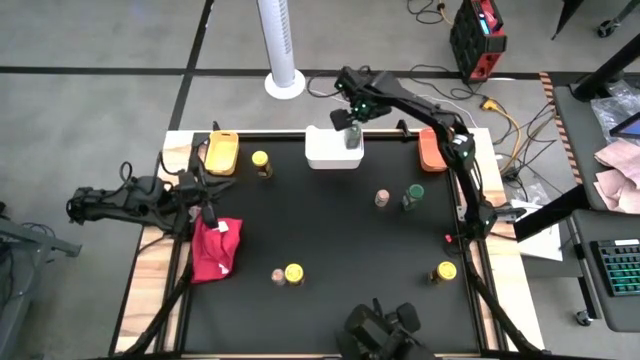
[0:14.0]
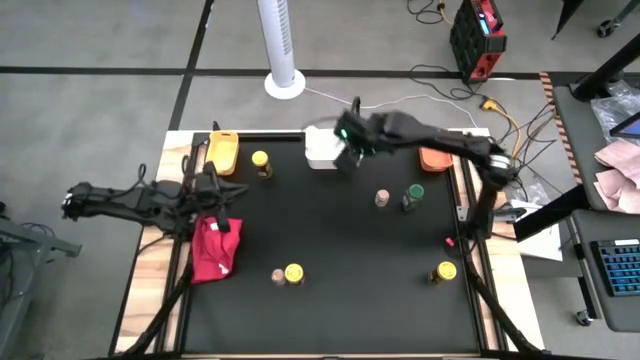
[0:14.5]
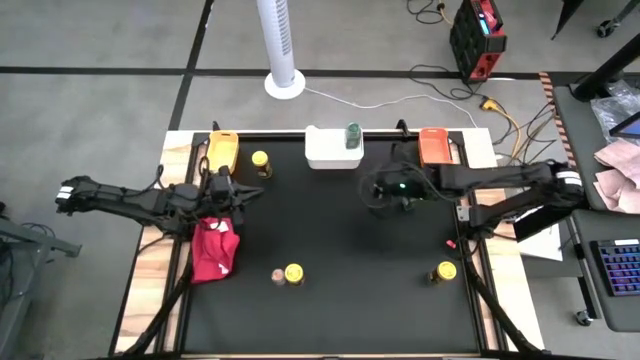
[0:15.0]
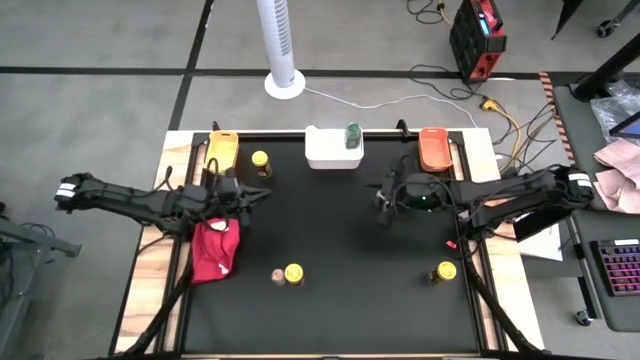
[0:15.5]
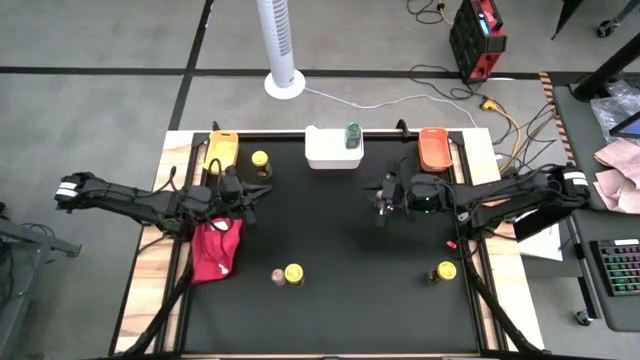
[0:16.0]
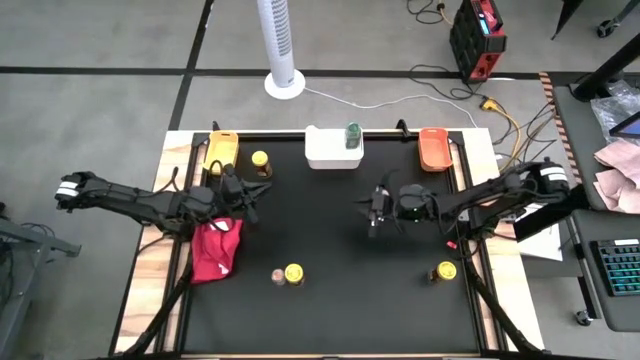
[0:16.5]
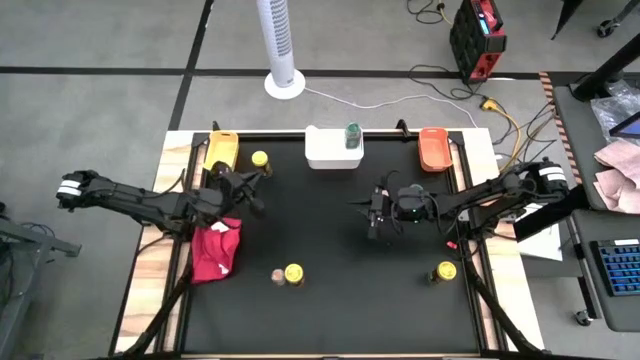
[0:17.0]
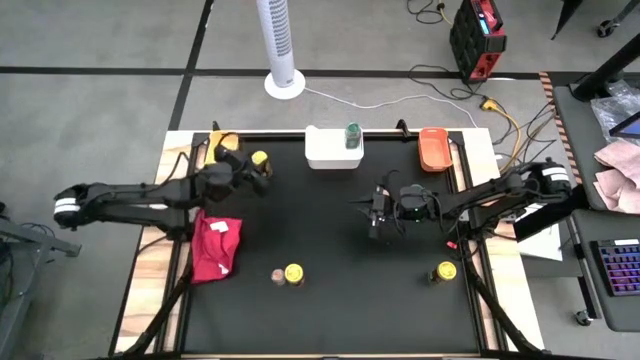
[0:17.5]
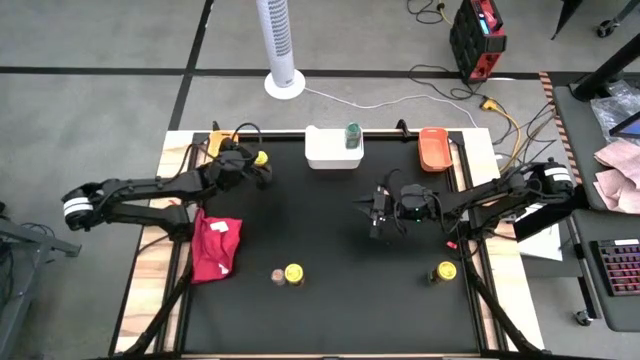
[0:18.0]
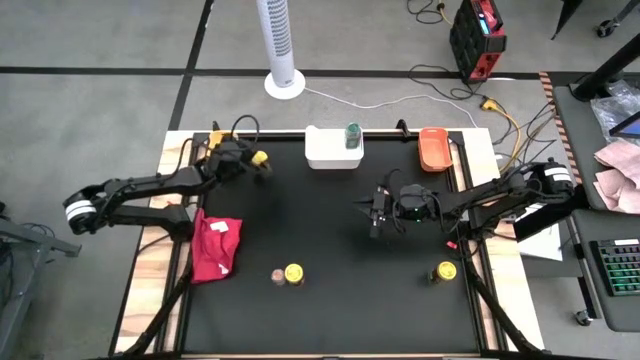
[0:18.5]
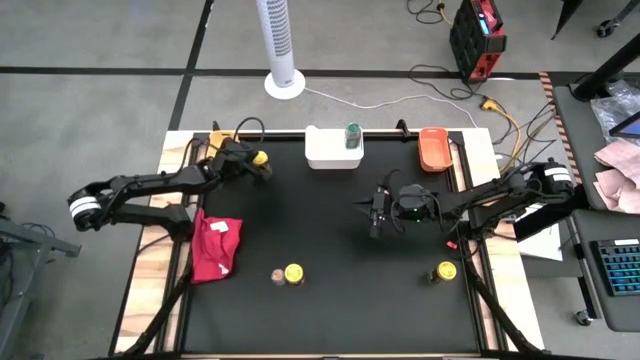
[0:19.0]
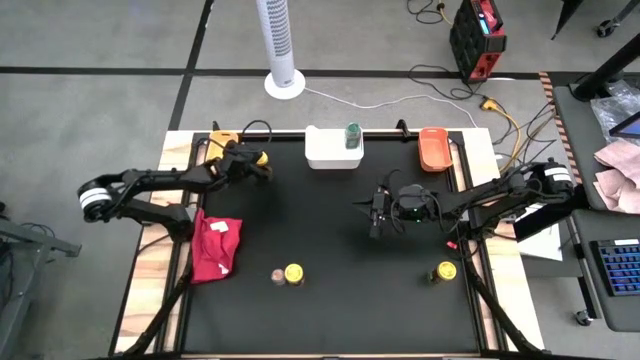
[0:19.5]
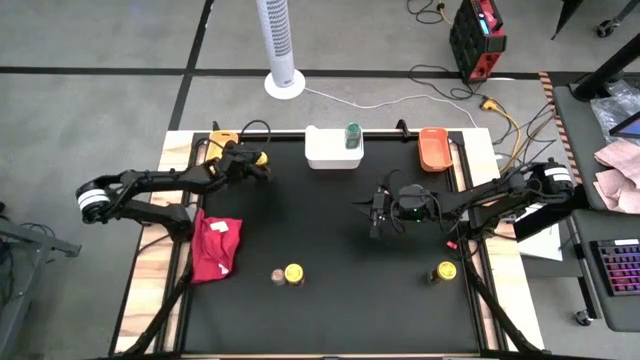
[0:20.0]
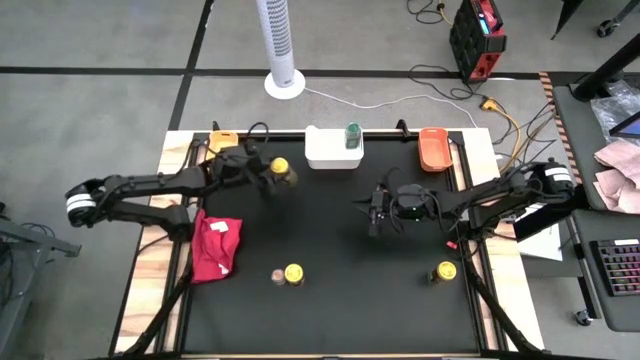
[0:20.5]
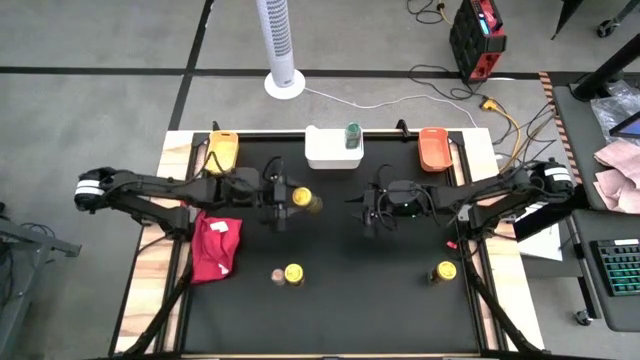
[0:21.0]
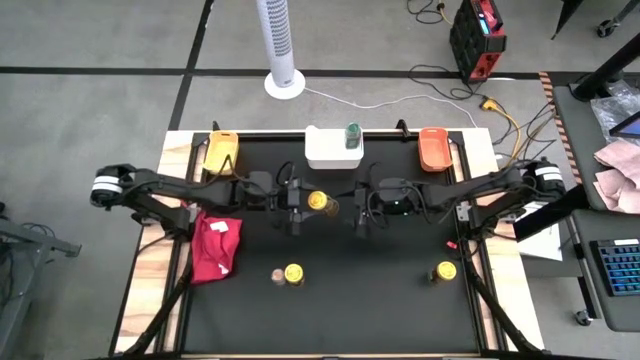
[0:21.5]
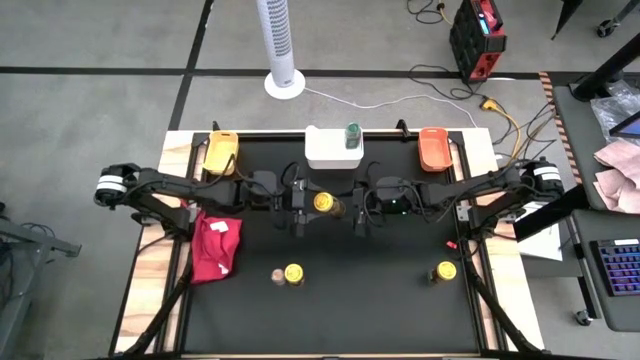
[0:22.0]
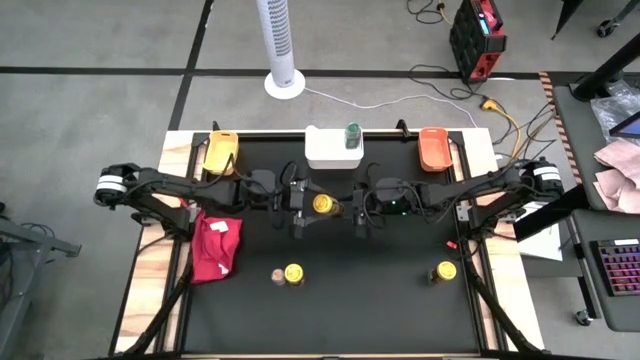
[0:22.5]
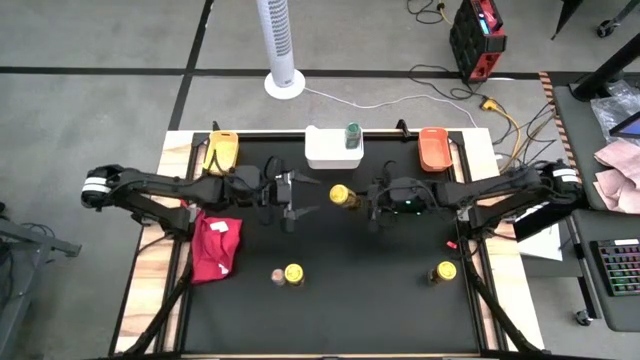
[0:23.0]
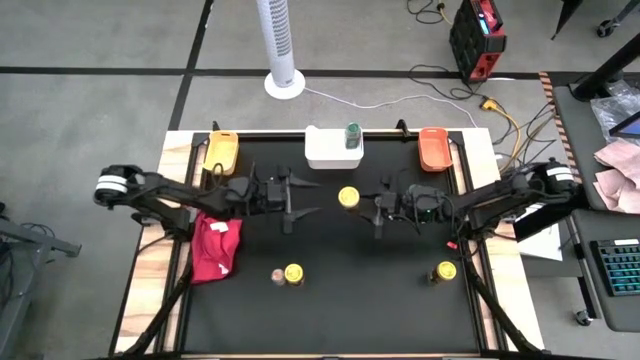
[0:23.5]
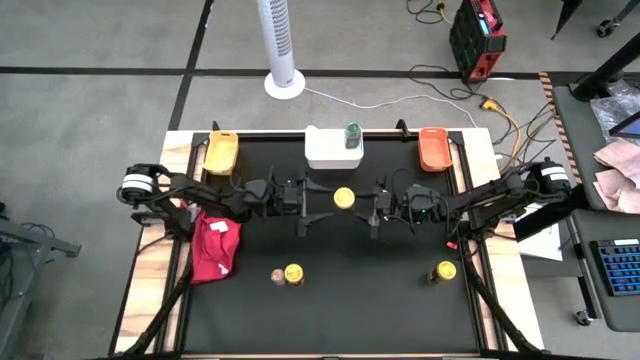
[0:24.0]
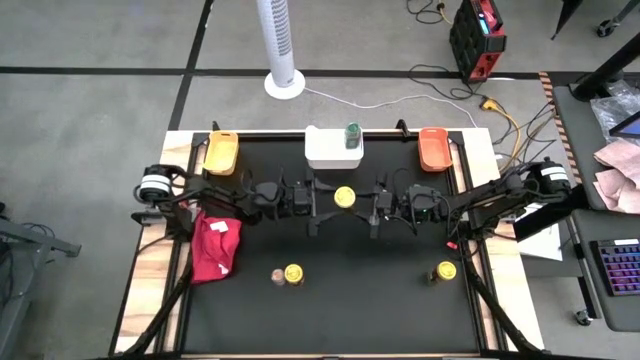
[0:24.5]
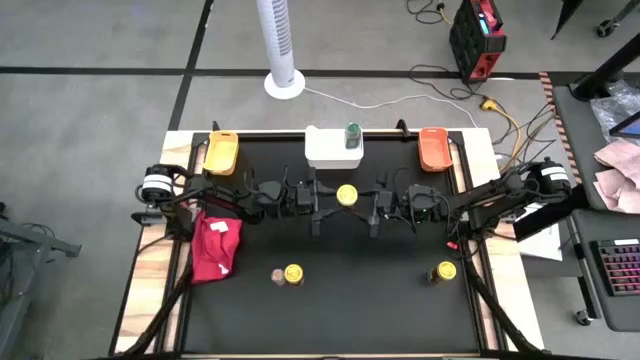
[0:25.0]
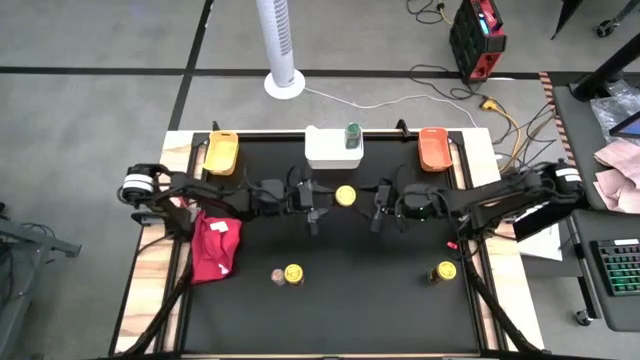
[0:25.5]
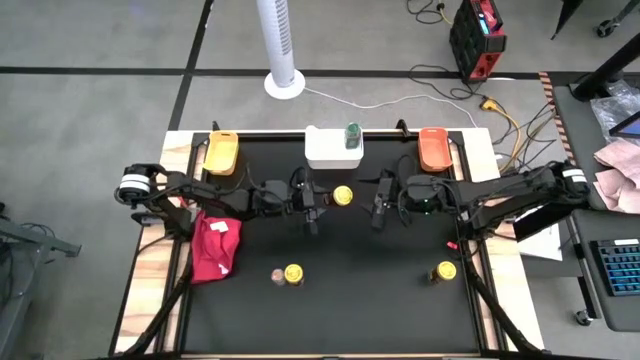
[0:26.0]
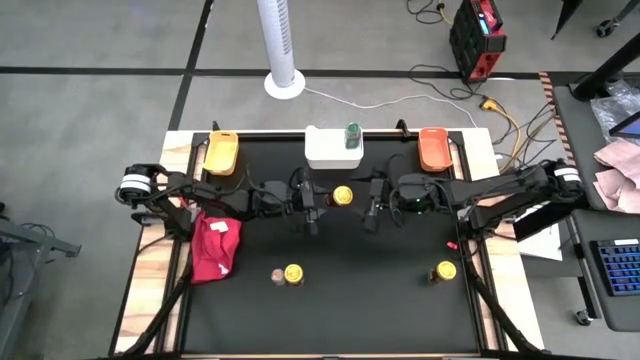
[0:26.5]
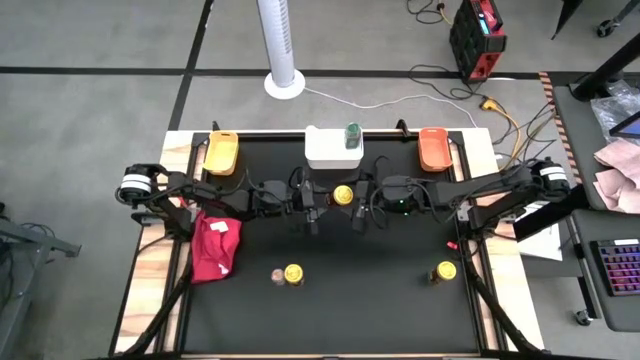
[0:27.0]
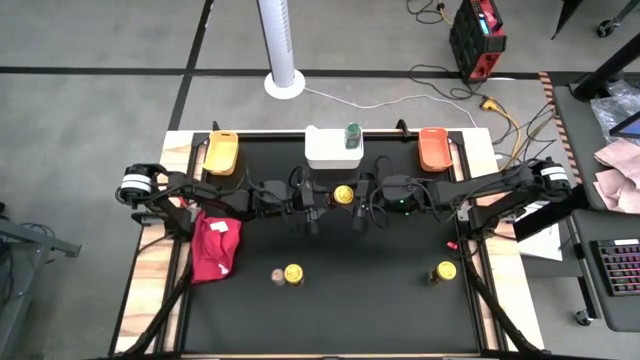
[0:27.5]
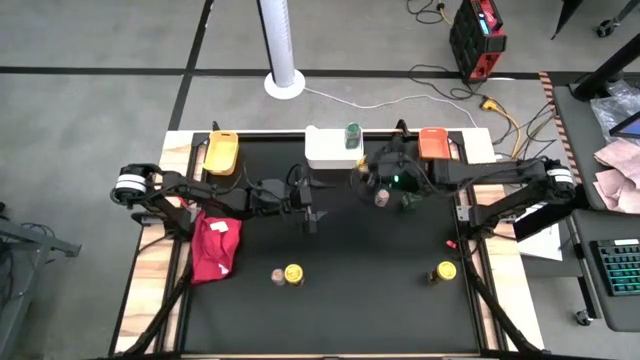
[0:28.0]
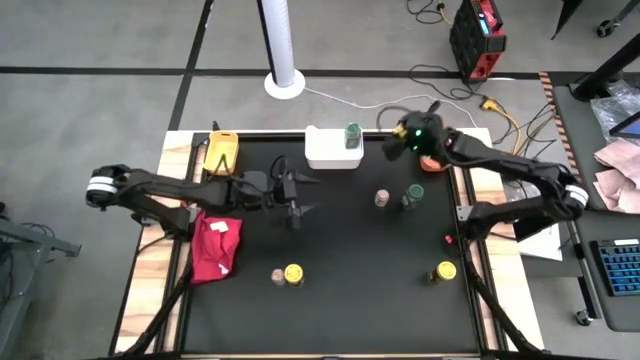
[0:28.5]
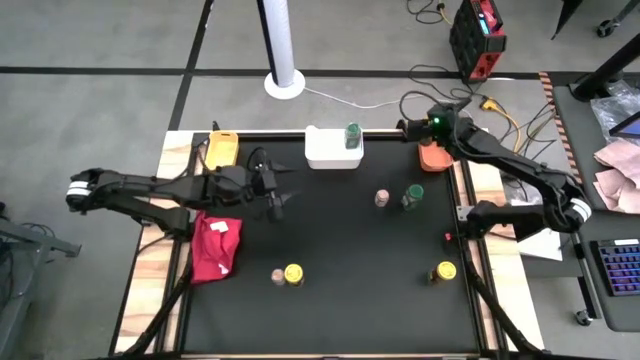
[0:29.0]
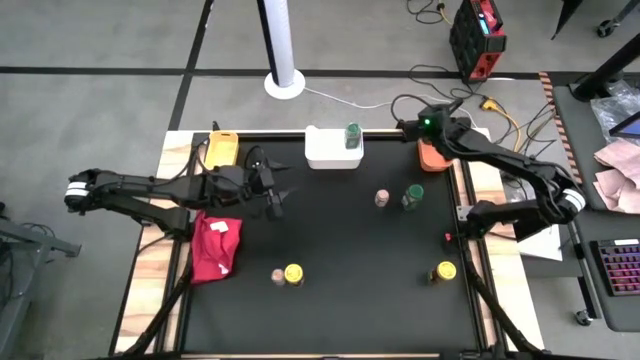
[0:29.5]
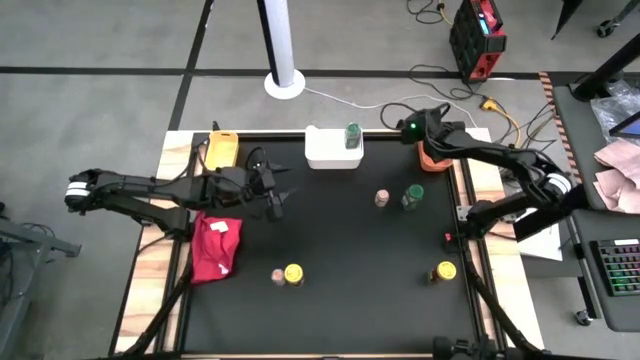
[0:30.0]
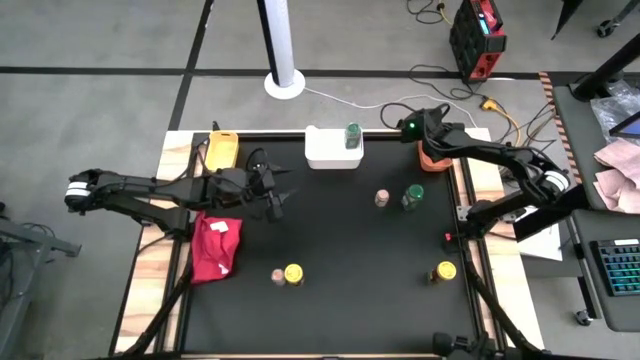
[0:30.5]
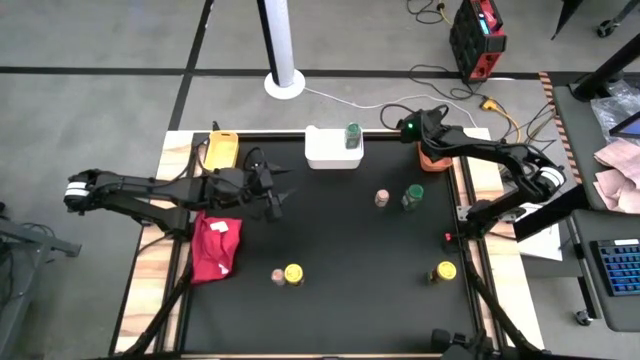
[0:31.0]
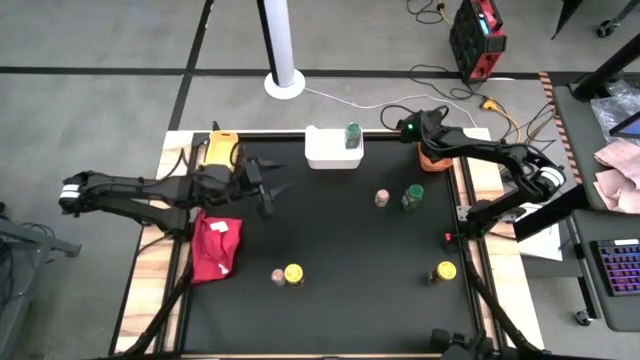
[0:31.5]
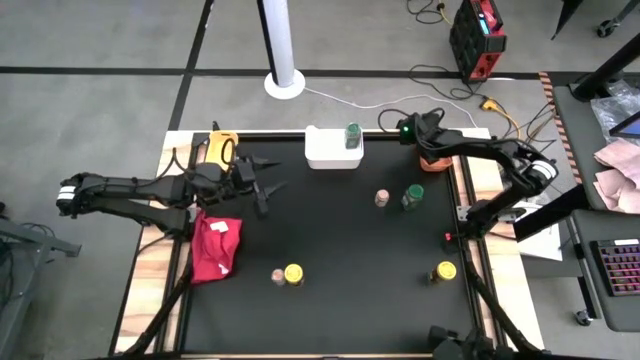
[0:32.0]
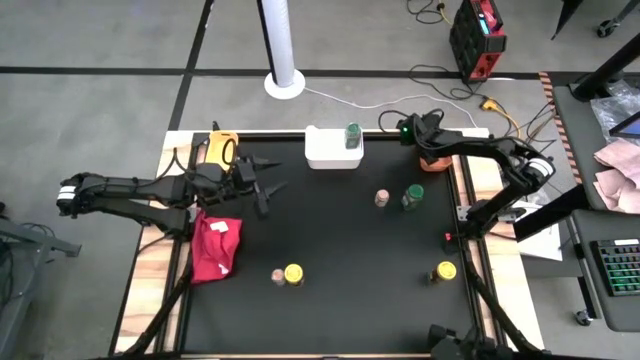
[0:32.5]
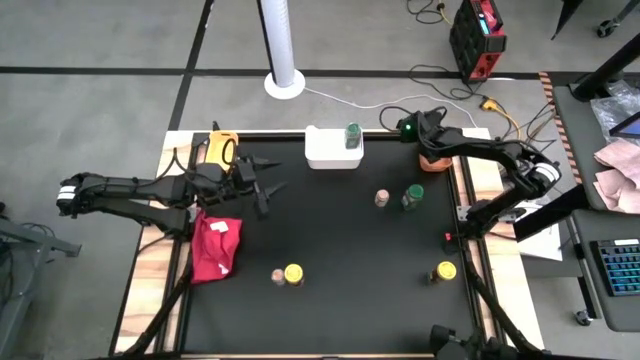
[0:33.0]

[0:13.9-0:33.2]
Task: Sort spices by type
Put the top dark brown spice bottle into the orange bin

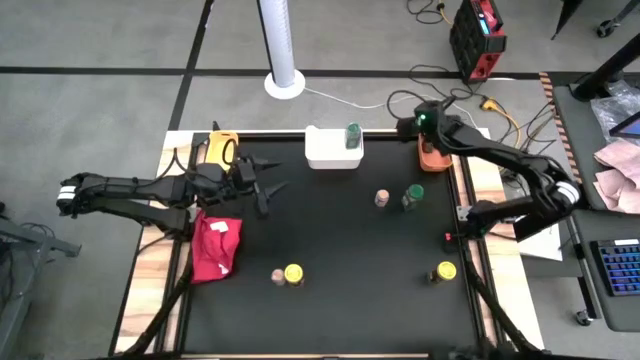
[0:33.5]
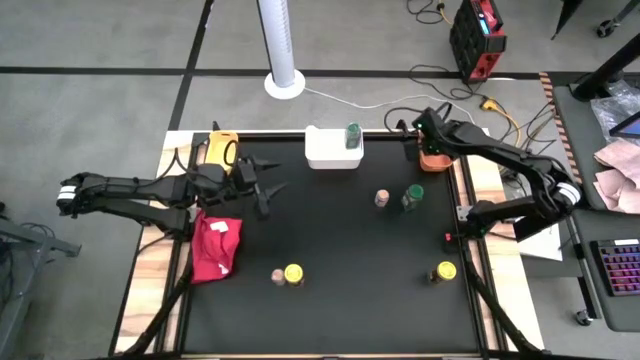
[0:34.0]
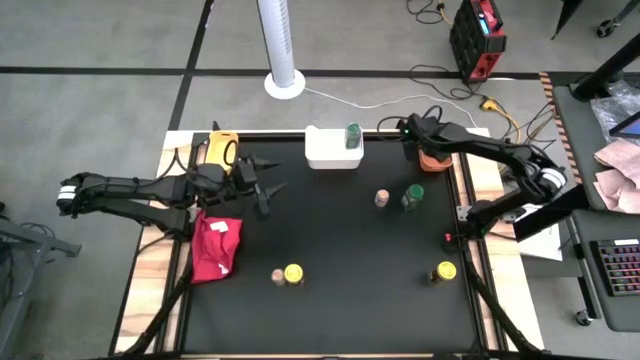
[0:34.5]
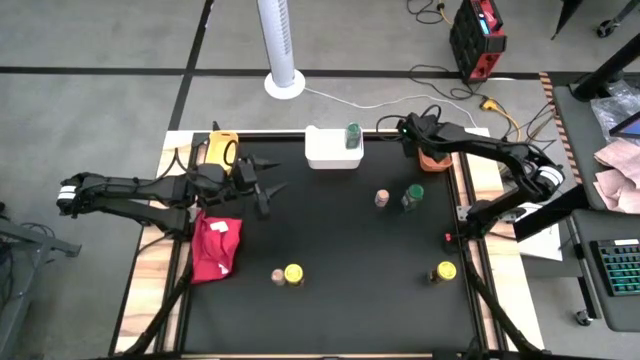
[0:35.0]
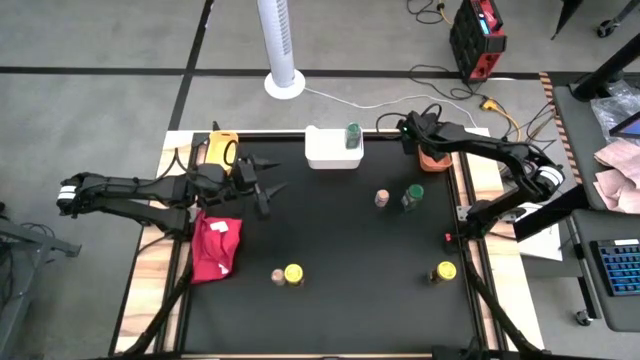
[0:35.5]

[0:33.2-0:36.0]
Adjust the top dark brown spice bottle into the orange bin
